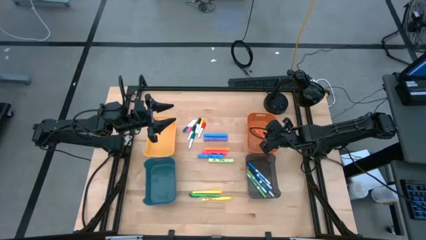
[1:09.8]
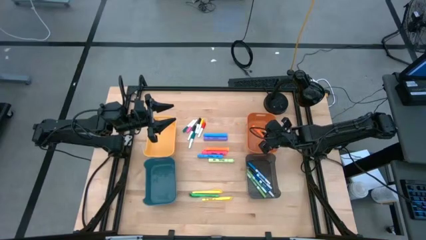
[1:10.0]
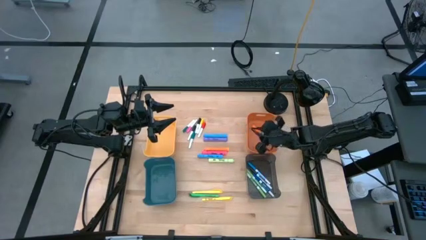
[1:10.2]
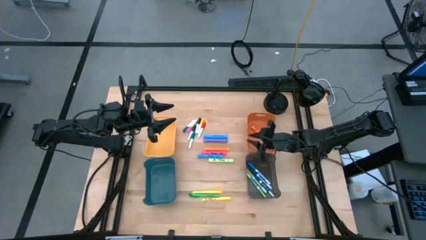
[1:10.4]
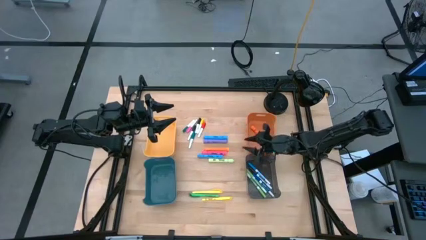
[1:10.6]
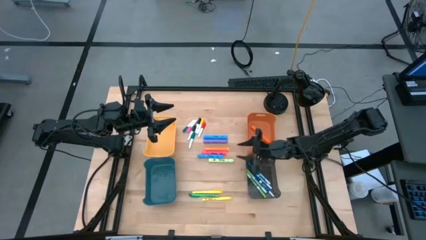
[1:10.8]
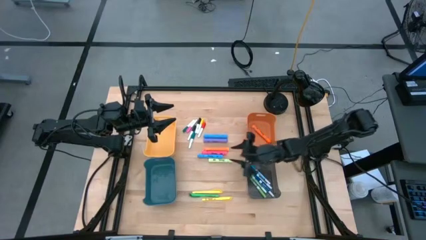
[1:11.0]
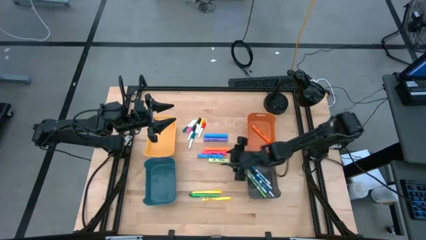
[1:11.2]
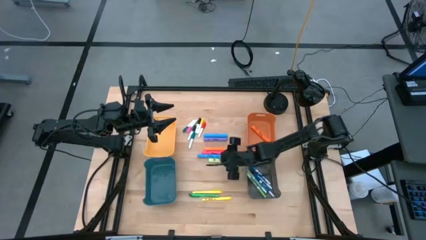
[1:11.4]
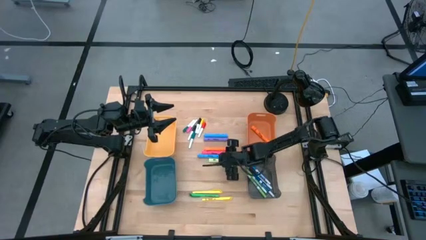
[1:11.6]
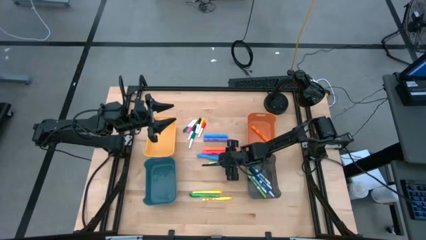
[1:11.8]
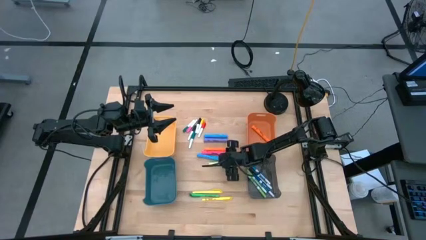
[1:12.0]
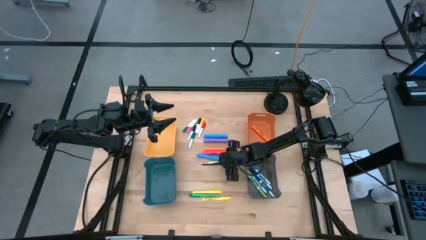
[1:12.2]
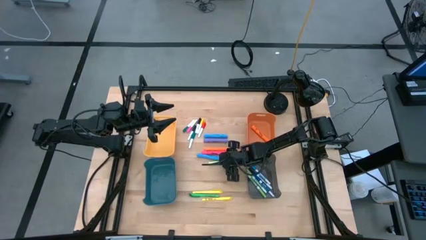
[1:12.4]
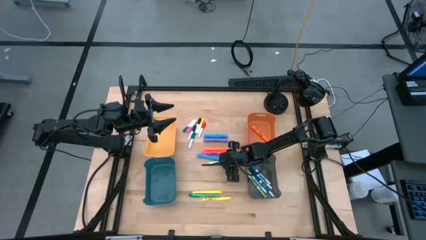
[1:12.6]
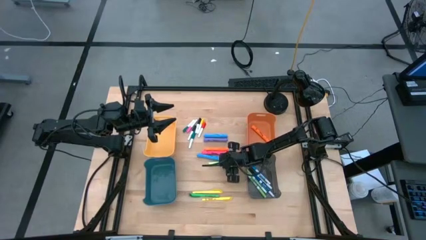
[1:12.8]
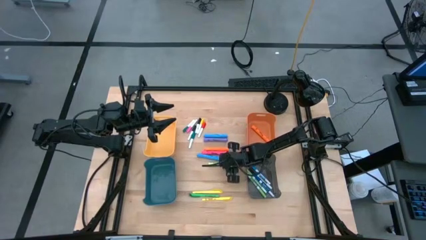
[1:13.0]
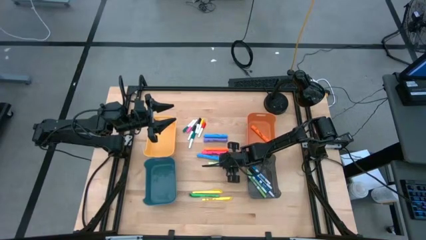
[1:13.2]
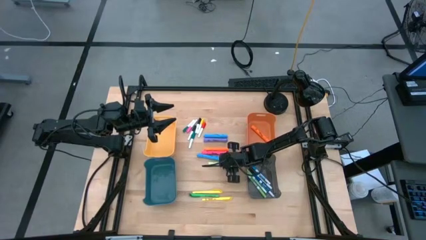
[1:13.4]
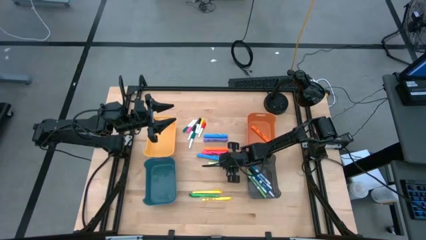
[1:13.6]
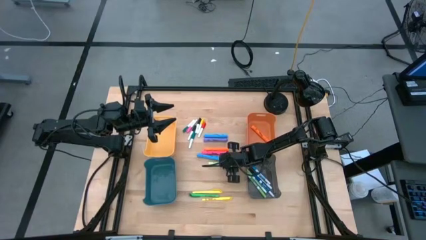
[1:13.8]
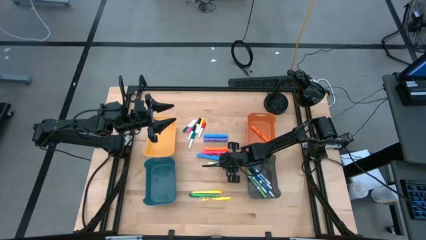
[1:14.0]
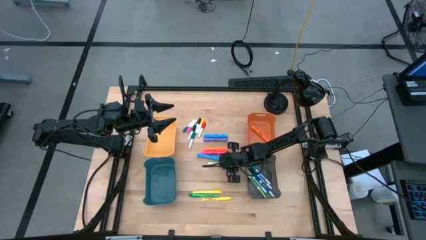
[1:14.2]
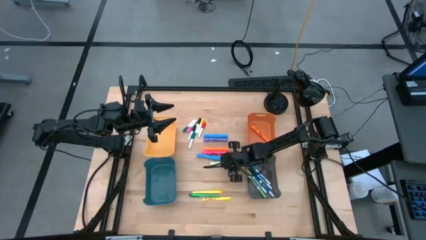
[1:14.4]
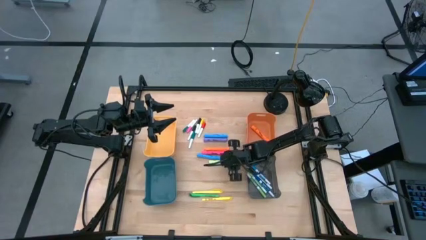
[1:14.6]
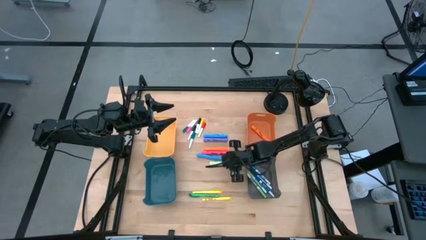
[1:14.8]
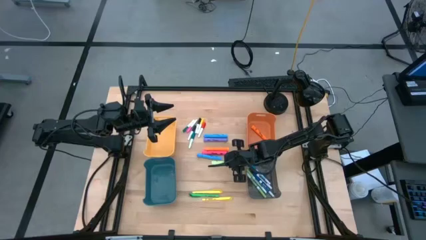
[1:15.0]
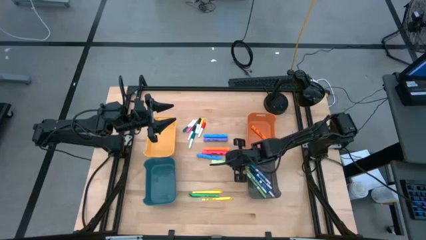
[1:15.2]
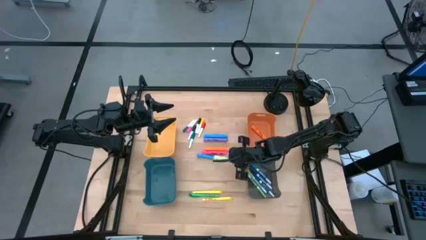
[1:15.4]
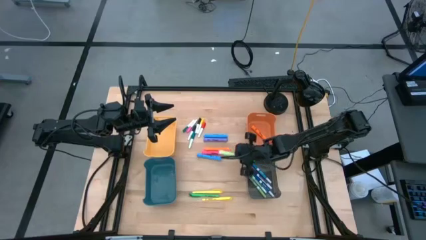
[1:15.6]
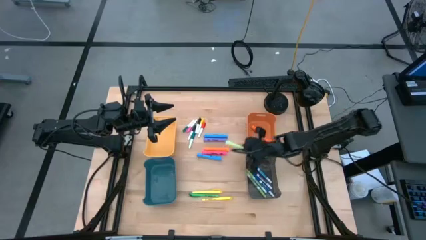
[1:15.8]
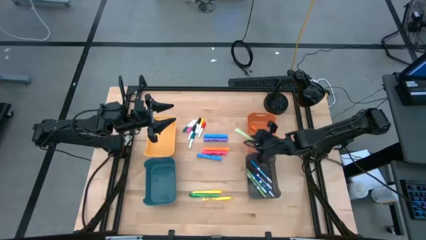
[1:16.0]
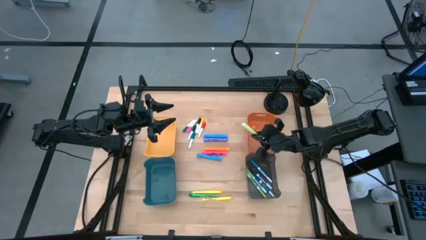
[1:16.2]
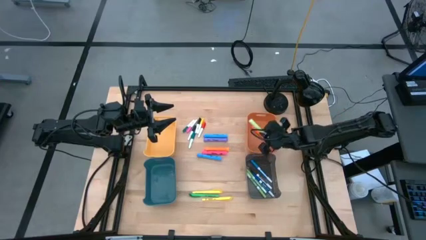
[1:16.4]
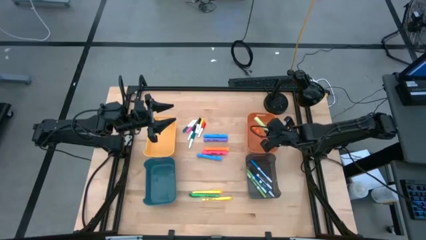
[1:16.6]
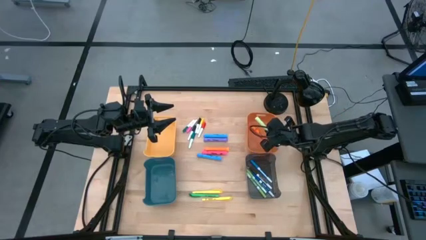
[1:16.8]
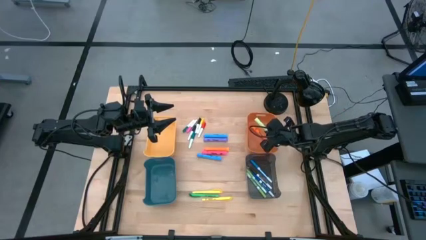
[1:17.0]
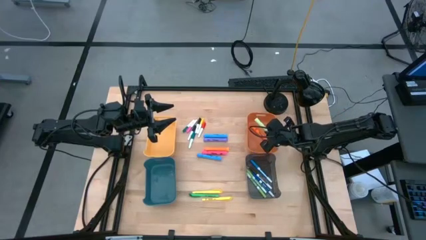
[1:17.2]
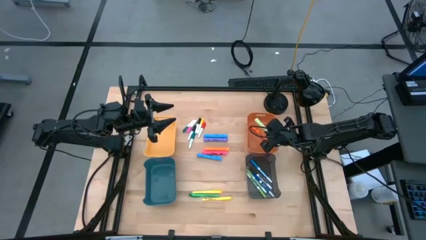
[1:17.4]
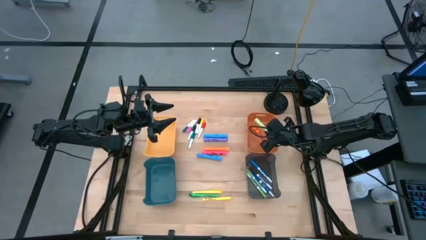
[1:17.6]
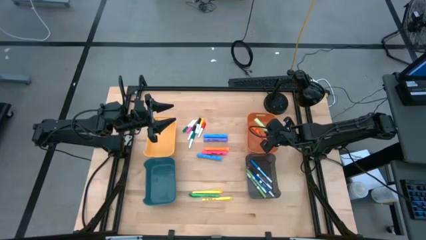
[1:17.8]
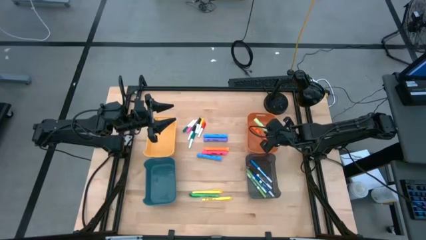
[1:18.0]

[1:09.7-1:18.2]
Task: Pick & Place Markers
Put the light green highlighter into the orange bin

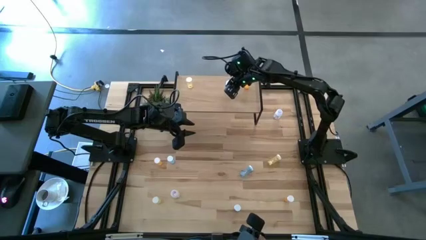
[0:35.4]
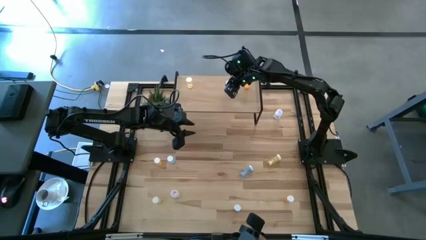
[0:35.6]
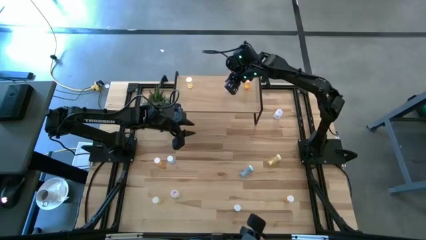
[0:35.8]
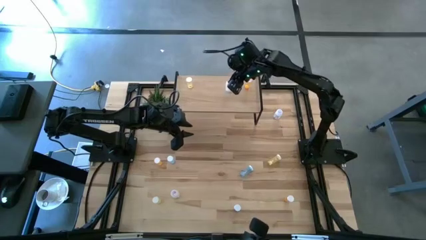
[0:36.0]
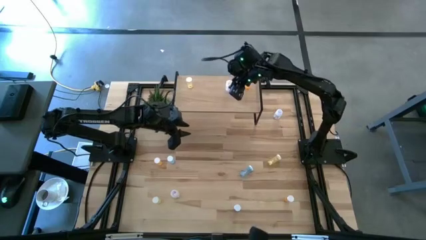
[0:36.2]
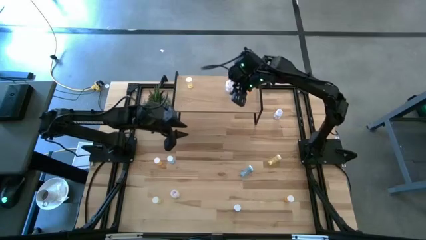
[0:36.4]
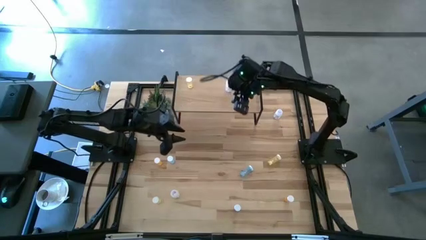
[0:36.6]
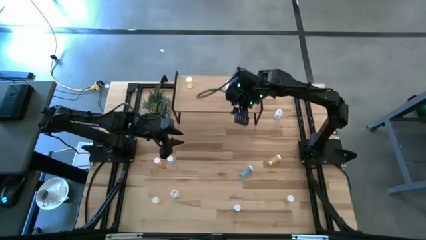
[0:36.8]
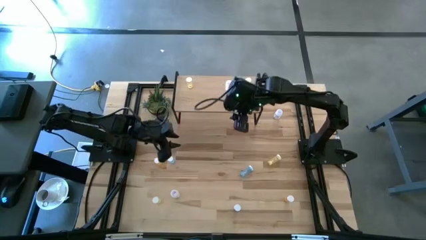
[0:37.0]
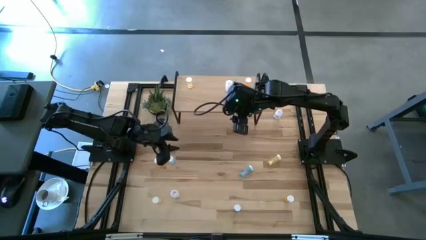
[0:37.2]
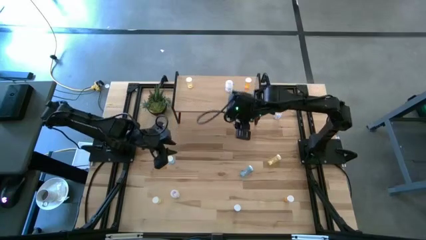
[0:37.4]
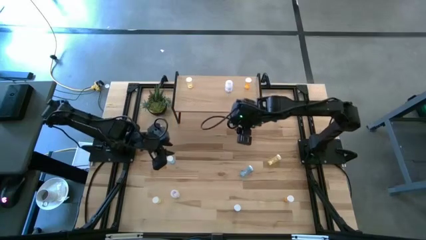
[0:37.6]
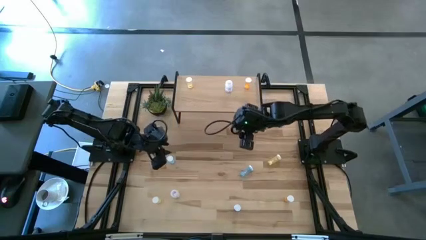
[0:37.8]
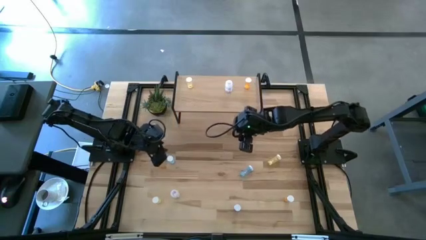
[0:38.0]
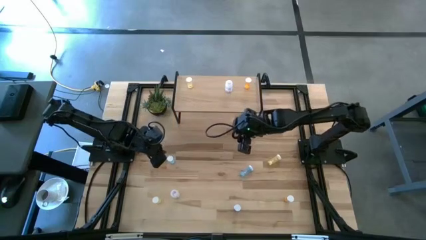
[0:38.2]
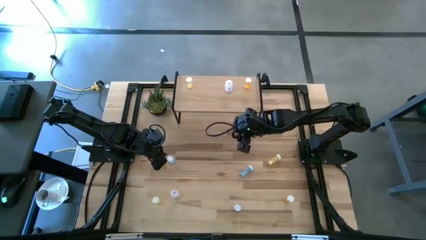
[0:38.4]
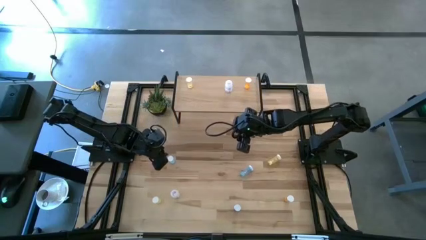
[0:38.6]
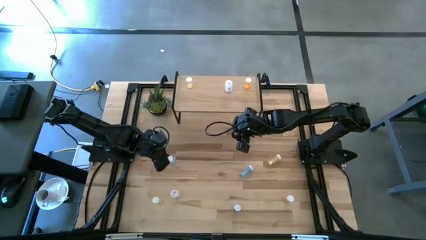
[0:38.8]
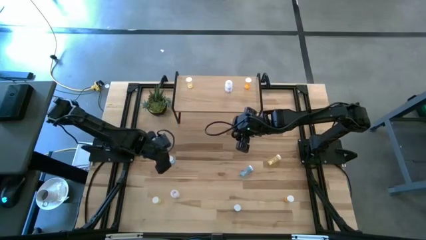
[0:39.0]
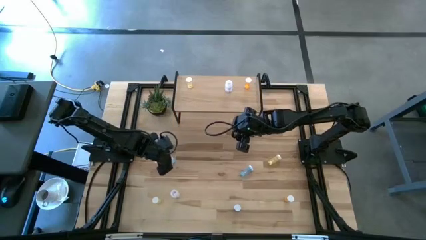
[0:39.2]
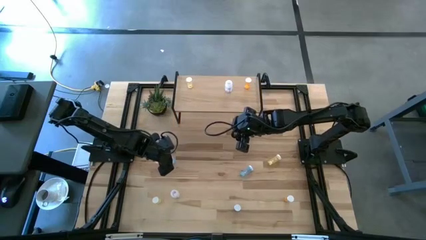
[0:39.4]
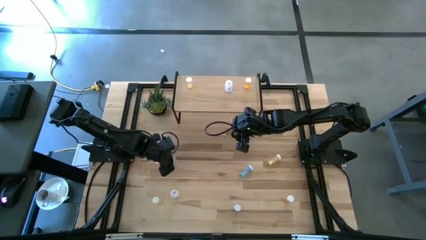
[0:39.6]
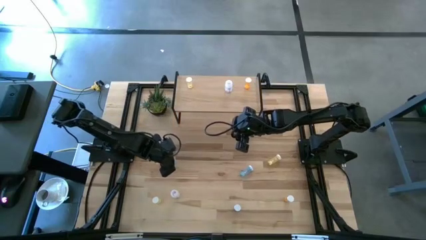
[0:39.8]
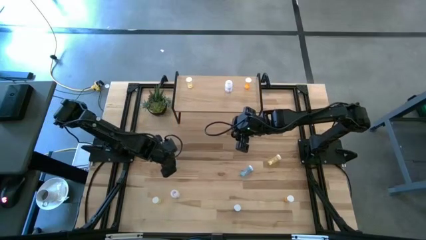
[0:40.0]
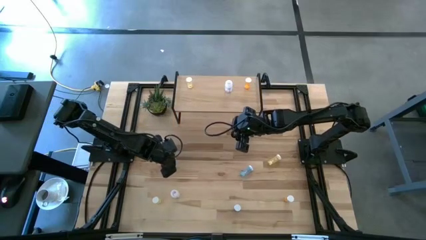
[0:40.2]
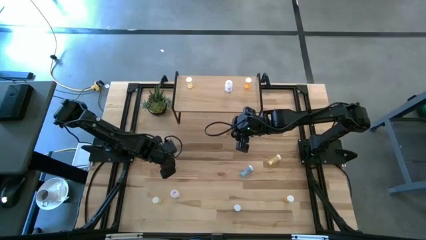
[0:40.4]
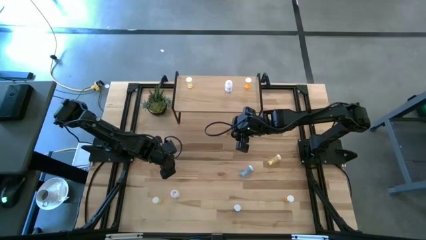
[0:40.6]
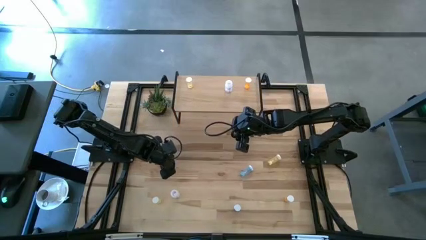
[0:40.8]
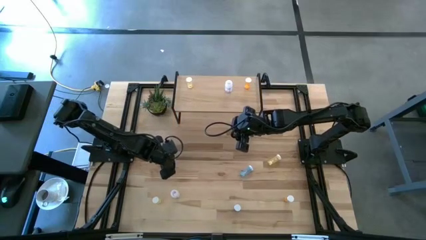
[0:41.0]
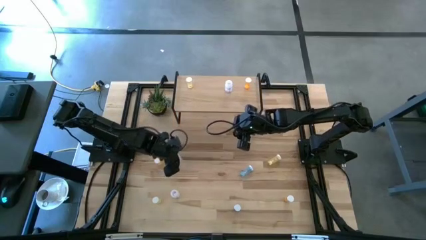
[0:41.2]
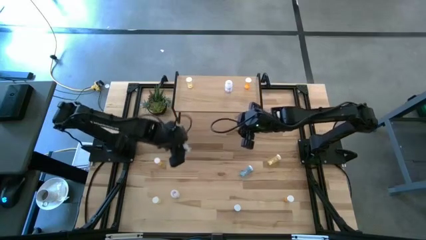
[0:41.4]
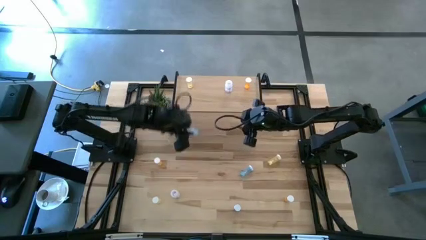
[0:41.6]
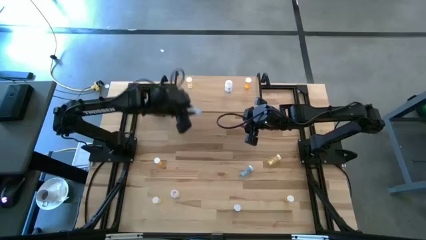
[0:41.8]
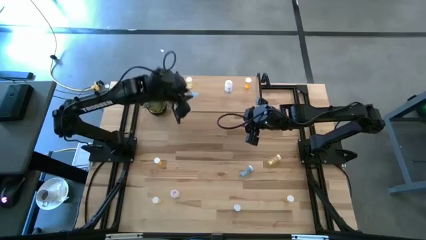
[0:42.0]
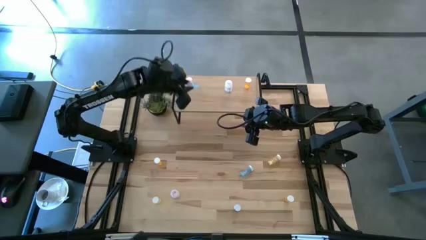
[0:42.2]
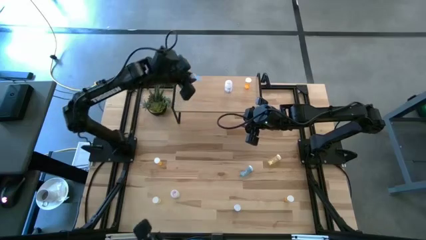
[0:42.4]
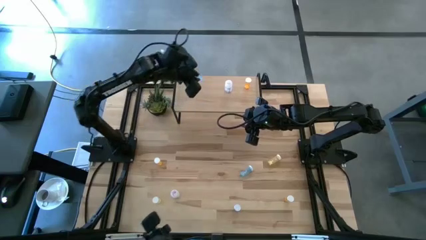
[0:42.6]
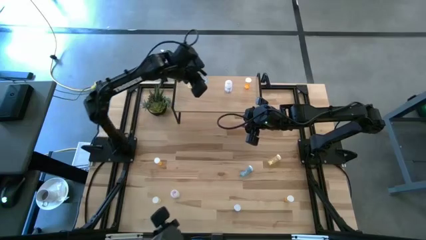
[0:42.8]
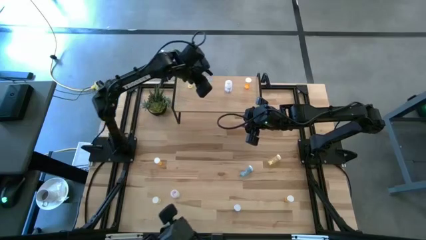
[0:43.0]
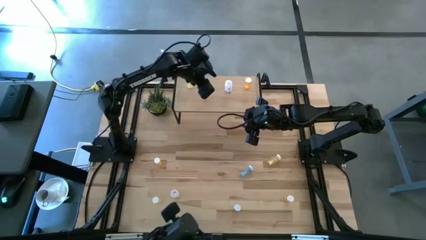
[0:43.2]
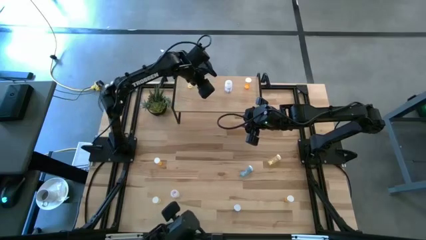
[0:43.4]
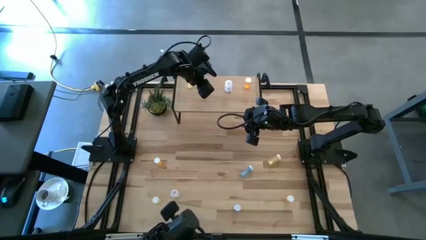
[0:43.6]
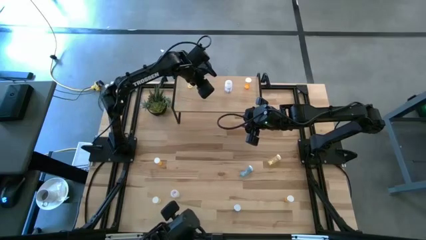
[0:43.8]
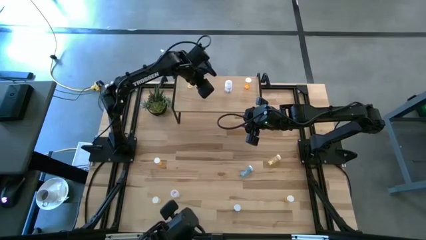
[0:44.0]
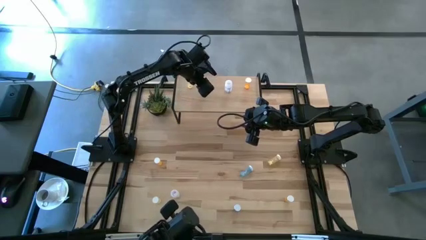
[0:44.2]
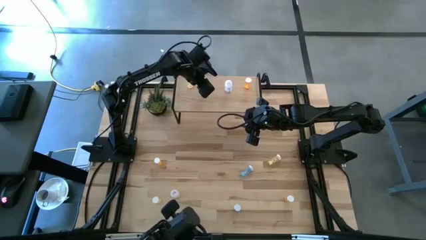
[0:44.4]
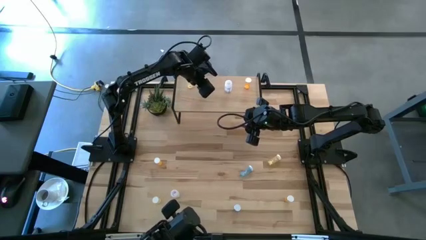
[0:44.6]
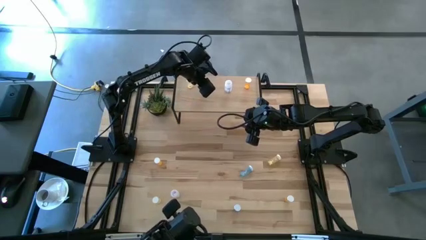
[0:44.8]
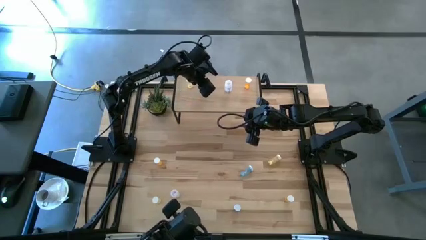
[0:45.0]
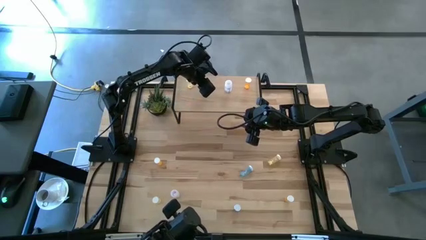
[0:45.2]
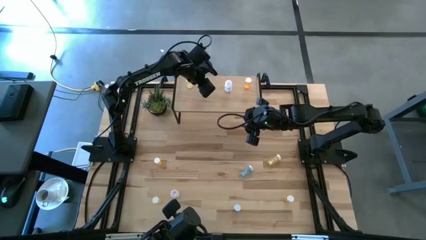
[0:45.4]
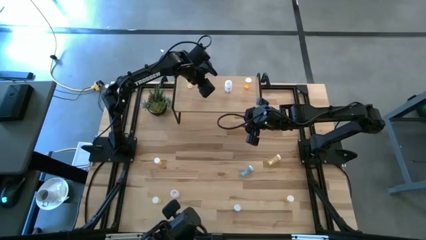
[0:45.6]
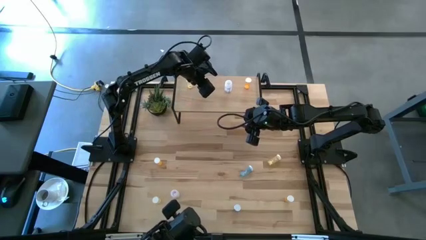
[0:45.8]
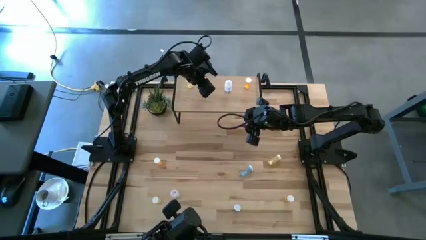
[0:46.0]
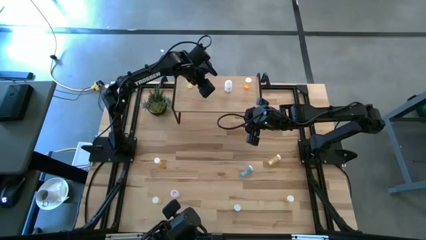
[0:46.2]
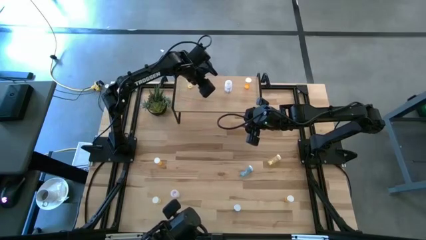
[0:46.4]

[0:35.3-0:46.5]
Task: Pick and place medicine bottles onto shelf by color
Put the top left blue pill bottle on the shelf
